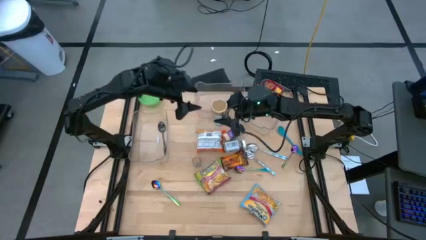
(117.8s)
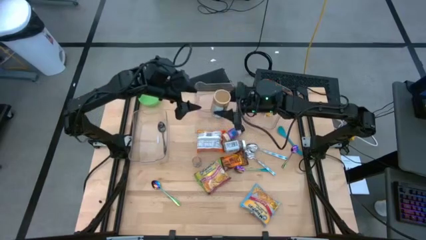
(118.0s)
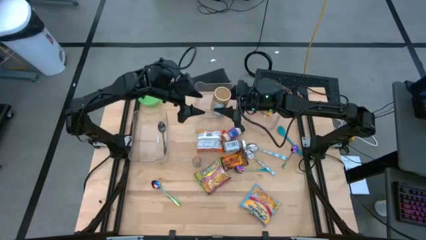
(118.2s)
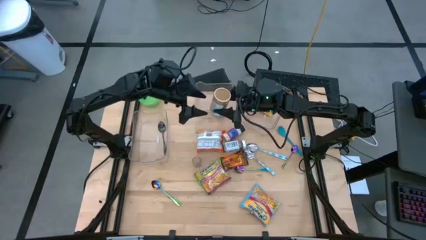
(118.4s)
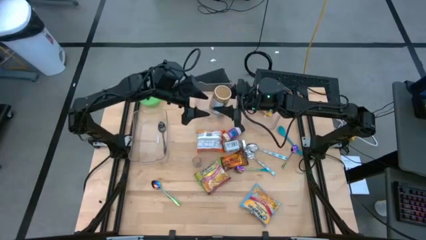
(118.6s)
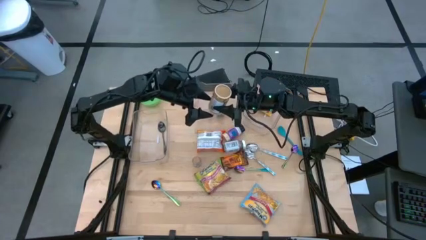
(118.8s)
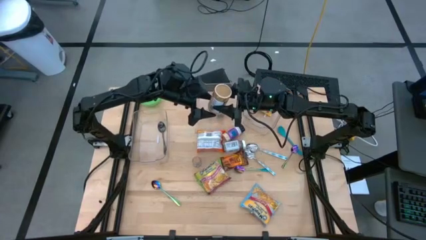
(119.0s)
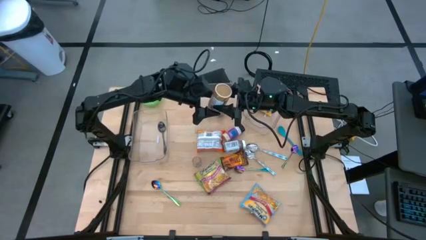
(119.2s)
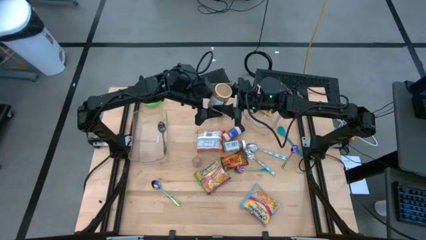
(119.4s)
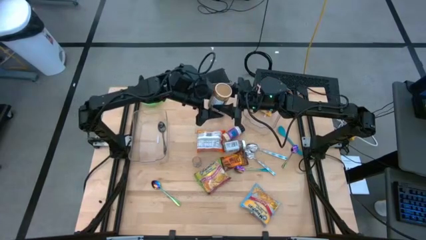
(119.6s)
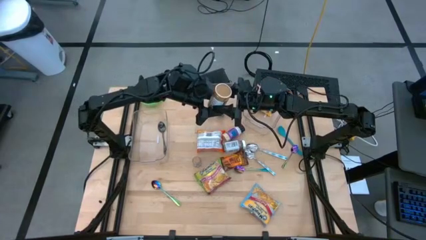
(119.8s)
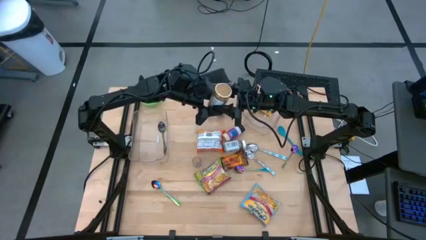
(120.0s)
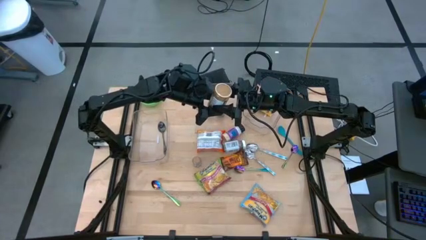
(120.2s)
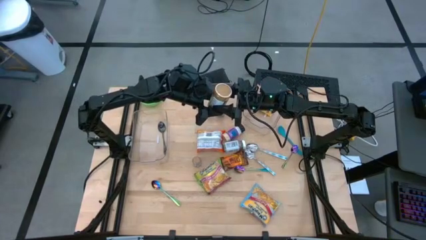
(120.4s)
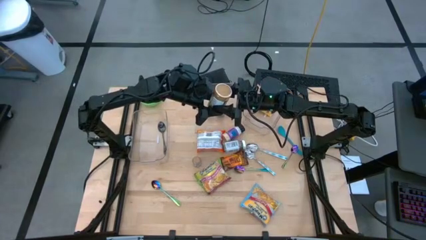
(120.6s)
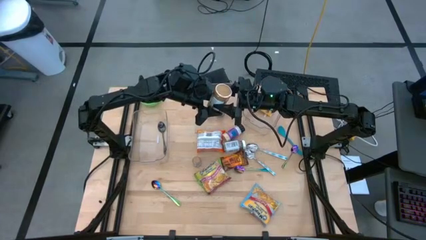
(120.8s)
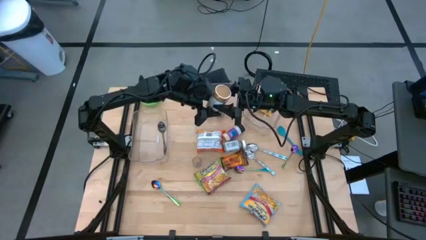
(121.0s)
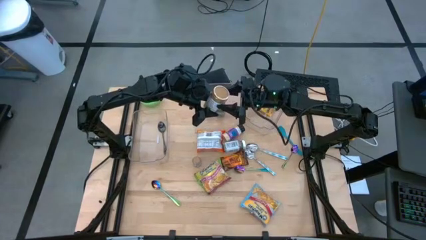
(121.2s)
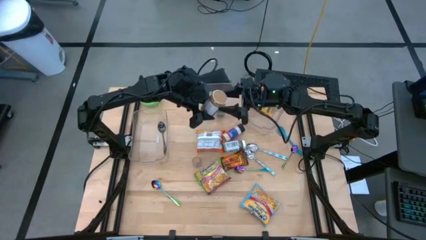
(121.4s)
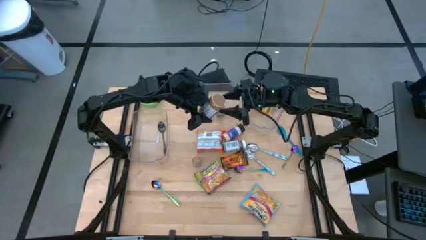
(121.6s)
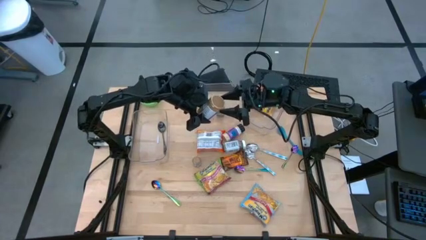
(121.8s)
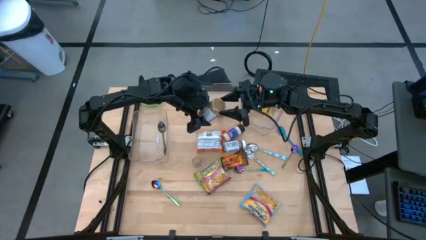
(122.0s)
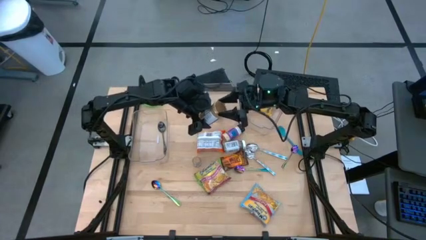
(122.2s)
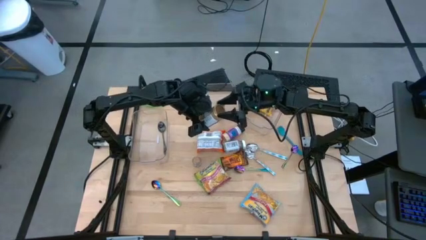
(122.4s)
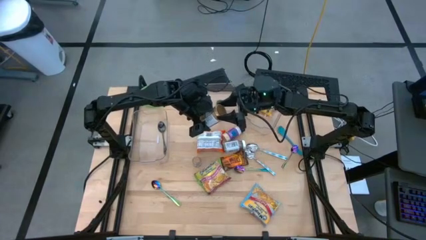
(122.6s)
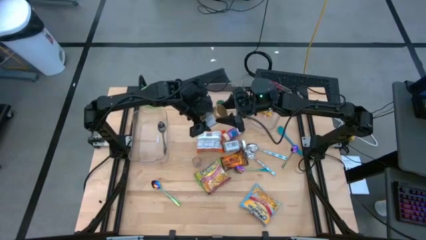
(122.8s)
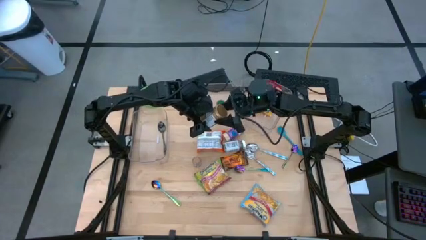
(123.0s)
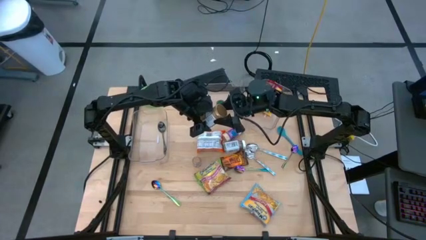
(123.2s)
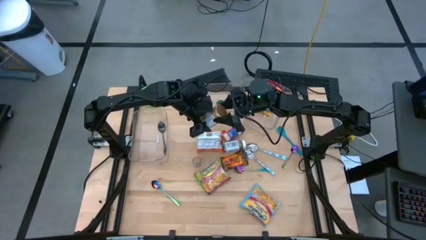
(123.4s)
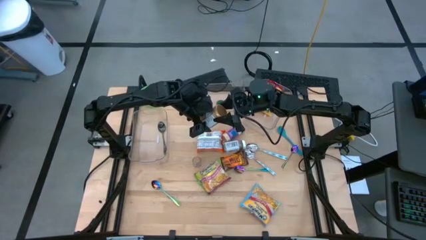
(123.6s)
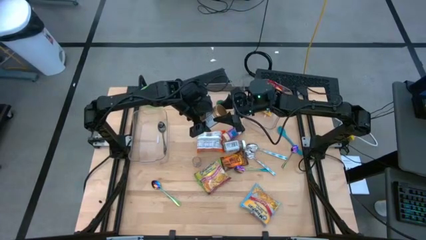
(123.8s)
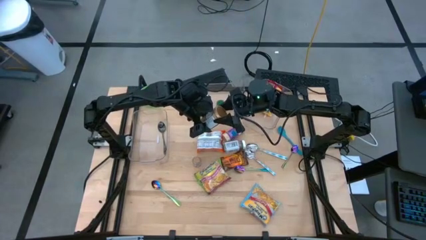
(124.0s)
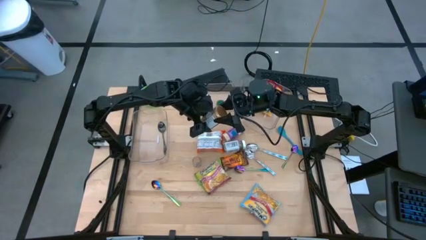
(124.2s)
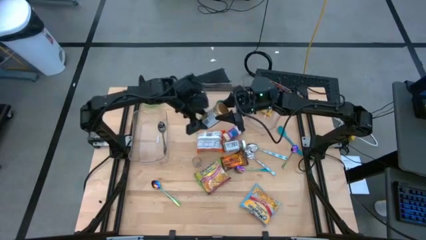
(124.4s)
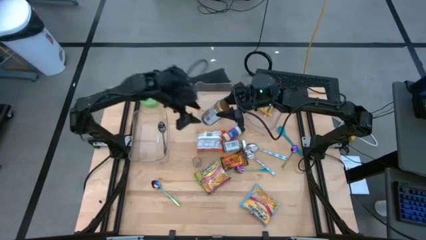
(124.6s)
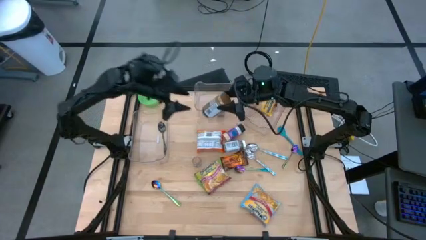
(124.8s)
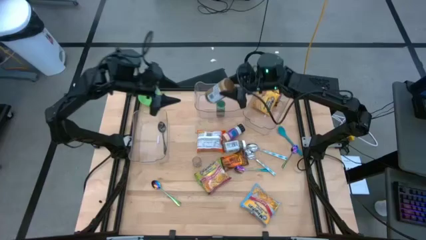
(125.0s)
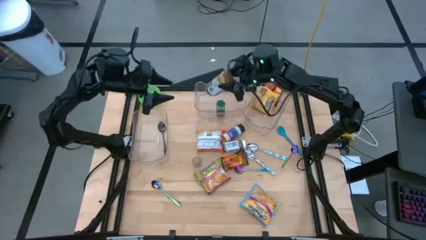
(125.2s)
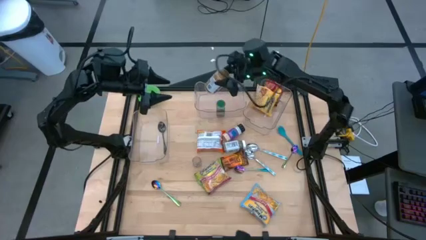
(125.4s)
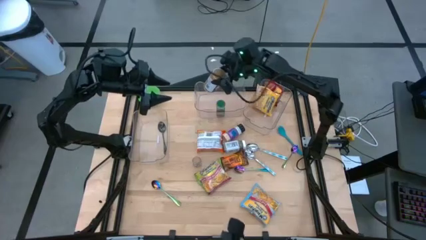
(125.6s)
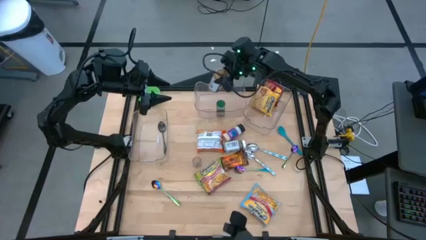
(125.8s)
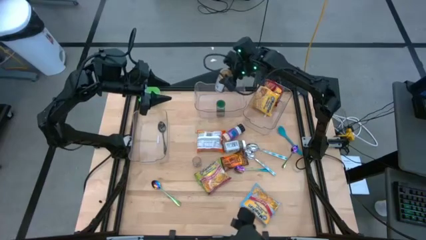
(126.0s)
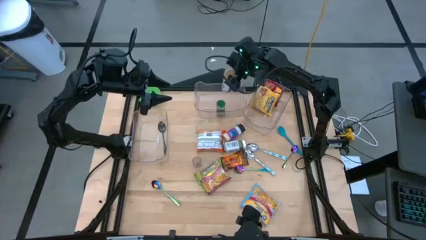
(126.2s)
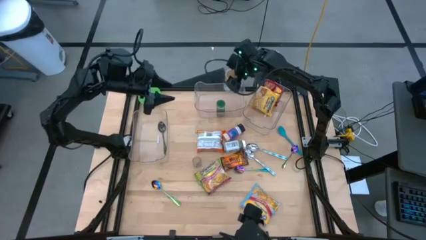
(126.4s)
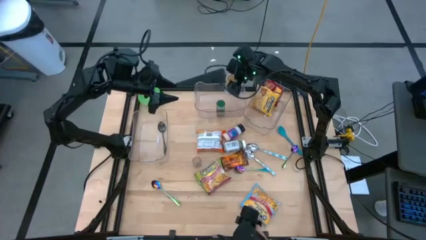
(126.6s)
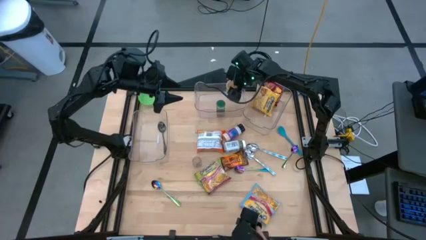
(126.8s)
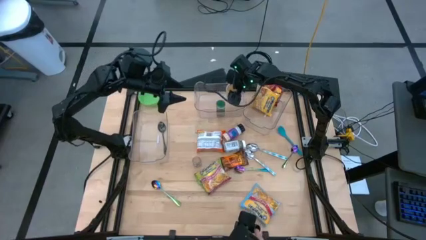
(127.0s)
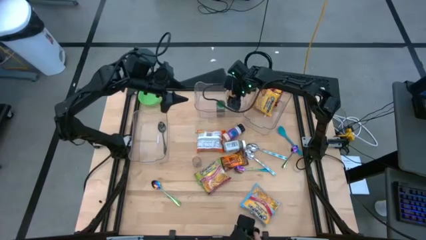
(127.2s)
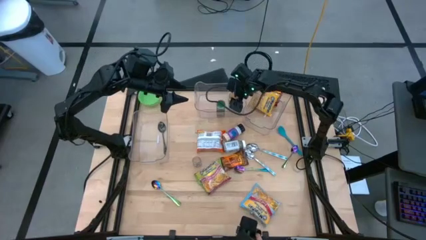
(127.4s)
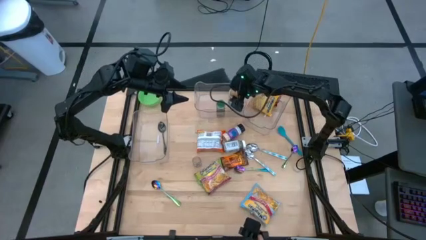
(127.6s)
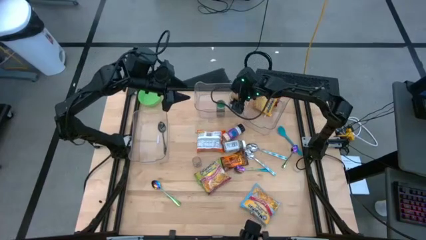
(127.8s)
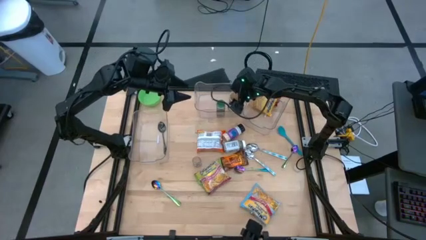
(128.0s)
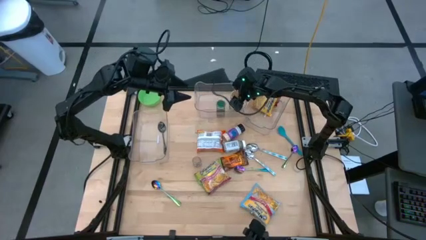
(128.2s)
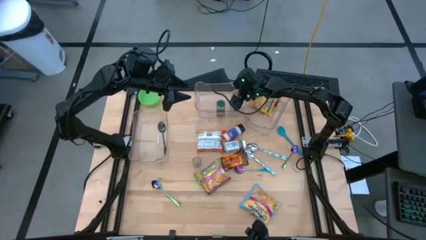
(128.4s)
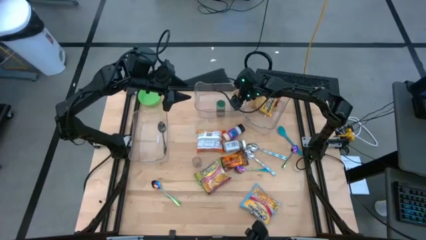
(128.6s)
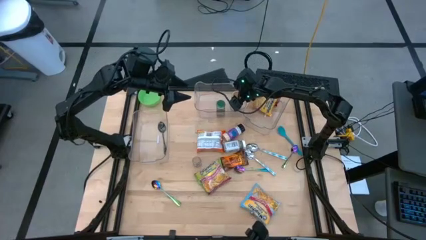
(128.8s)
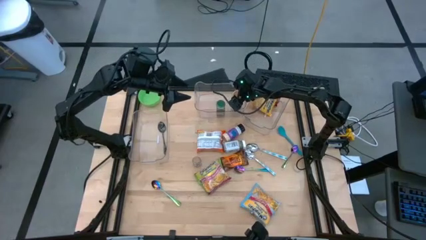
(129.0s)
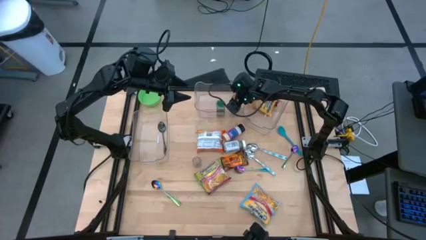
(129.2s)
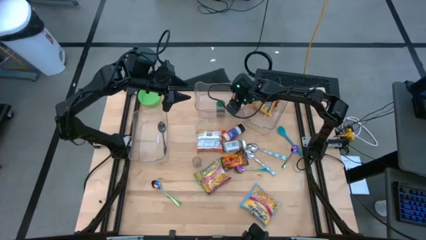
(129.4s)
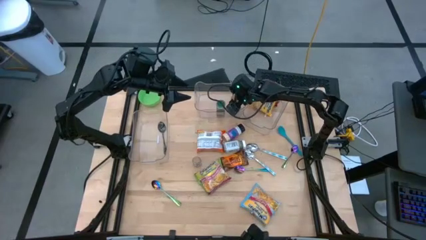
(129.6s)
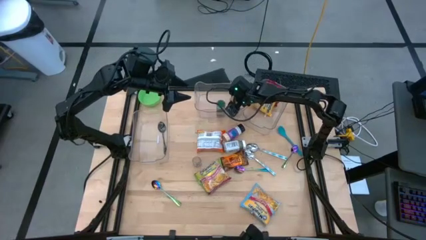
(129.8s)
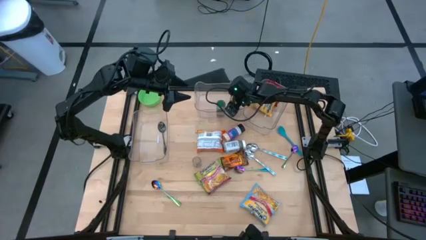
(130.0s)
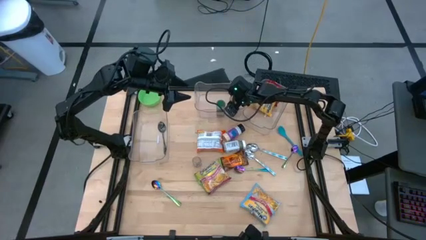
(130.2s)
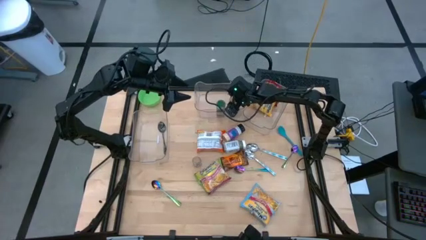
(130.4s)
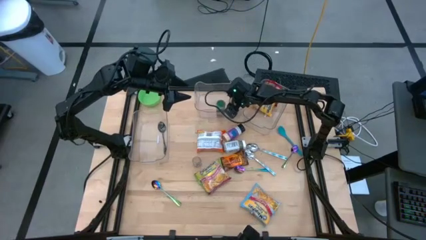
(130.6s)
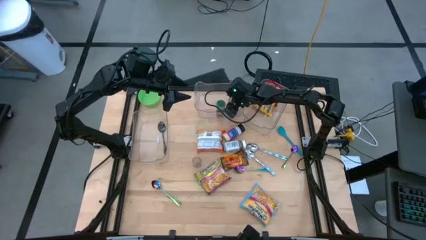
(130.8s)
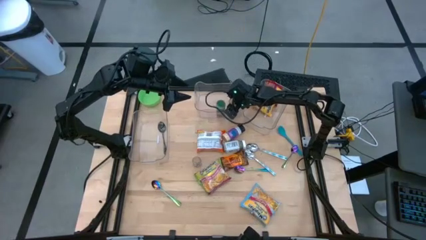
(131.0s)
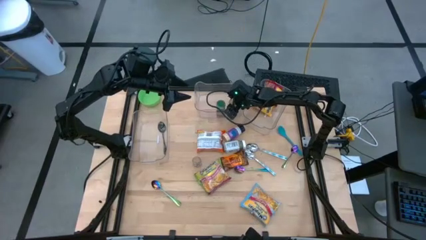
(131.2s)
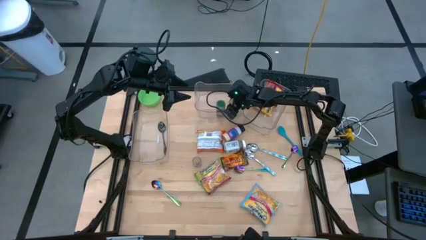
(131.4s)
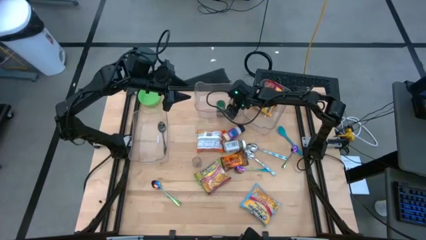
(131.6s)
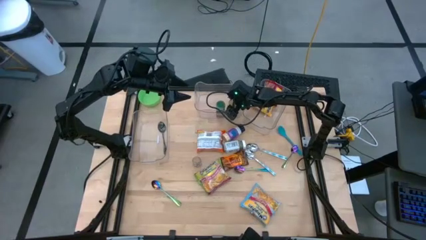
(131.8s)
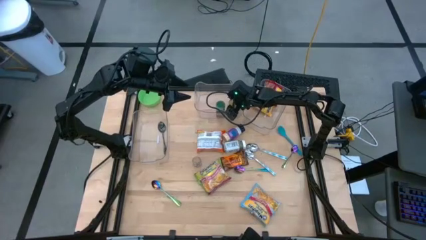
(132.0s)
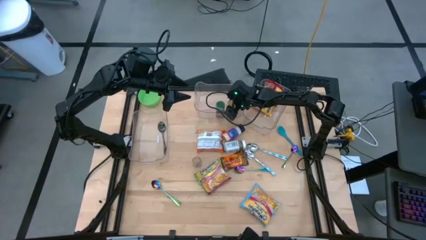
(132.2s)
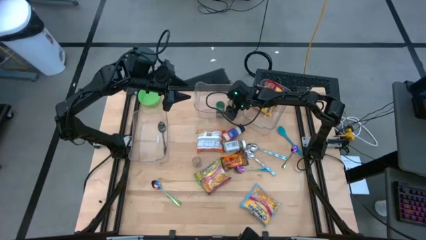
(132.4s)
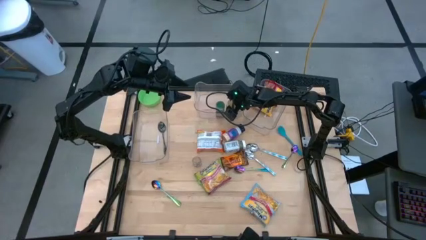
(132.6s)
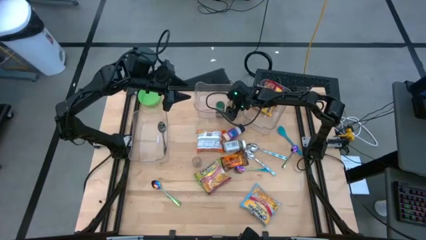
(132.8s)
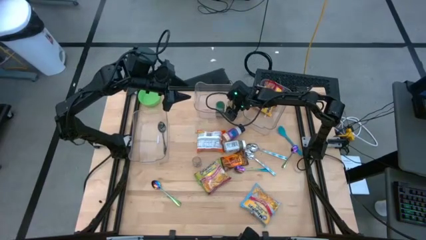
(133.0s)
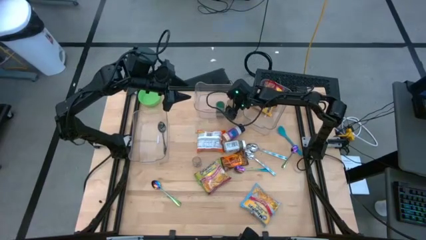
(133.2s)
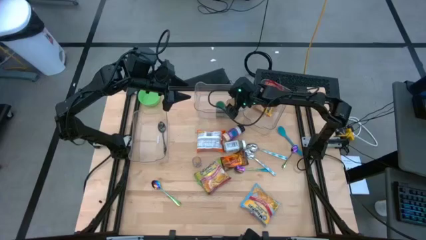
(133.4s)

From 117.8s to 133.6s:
Task: Pick & Place Food Item
Put the gold spice bottle into the middle transparent bin
